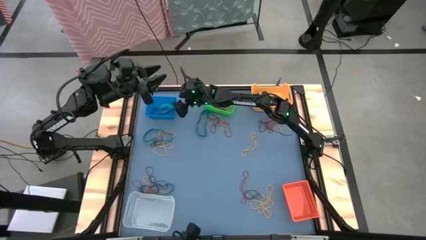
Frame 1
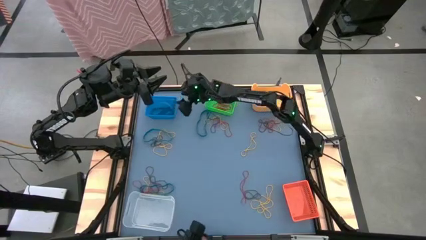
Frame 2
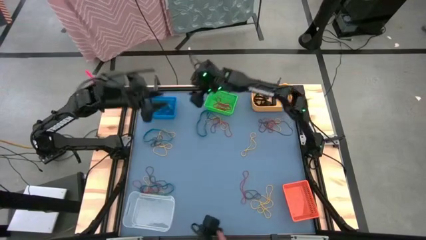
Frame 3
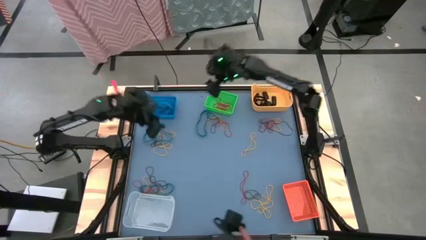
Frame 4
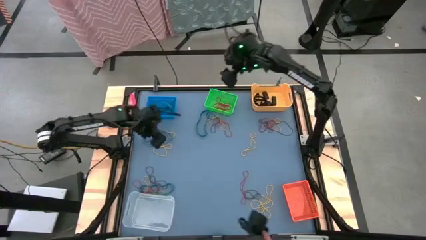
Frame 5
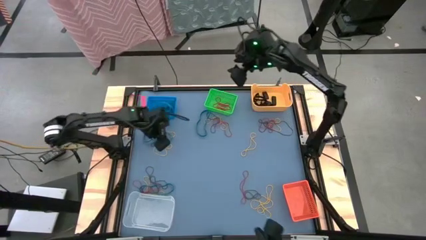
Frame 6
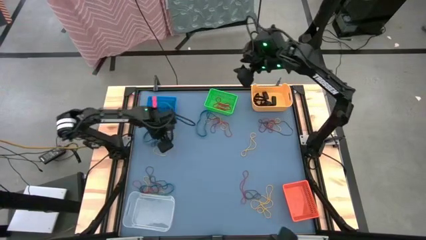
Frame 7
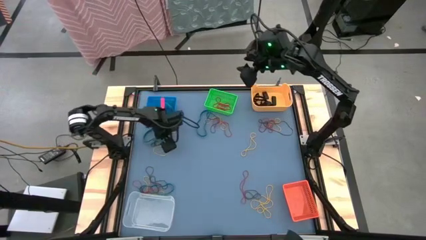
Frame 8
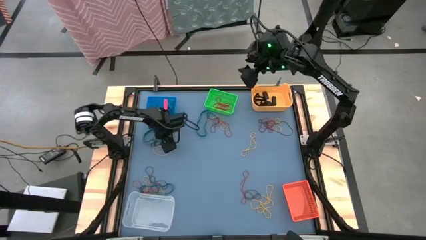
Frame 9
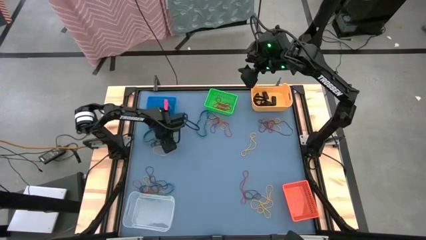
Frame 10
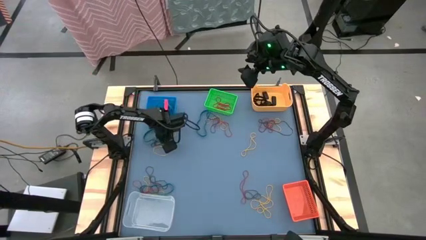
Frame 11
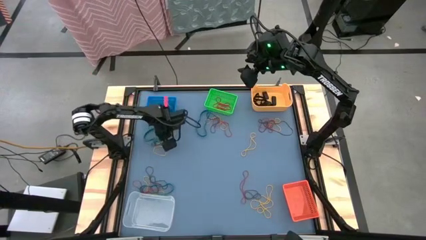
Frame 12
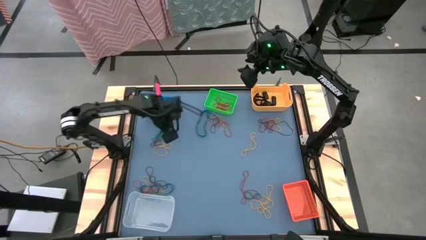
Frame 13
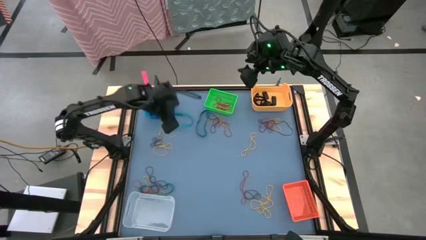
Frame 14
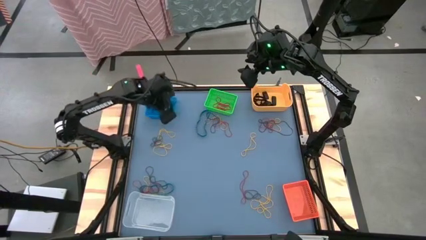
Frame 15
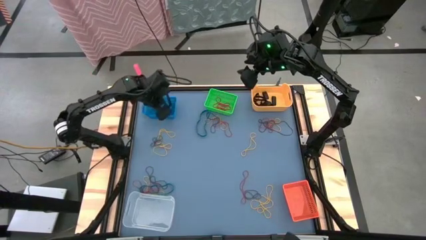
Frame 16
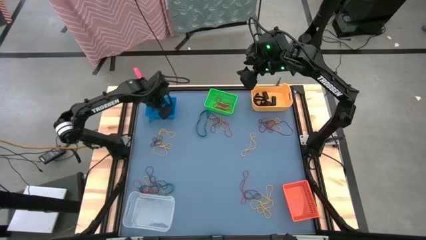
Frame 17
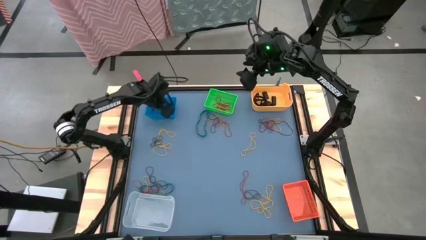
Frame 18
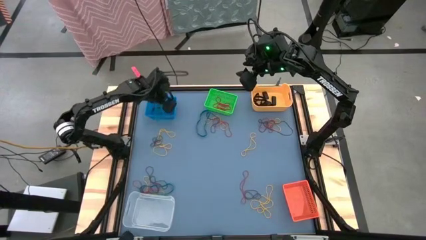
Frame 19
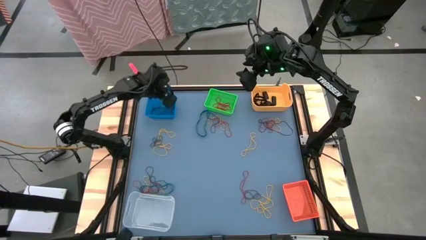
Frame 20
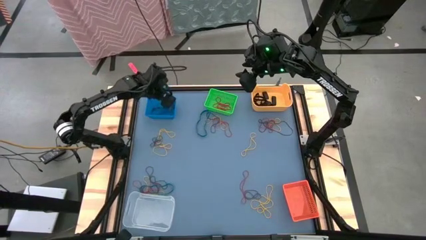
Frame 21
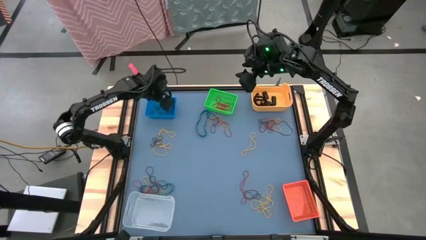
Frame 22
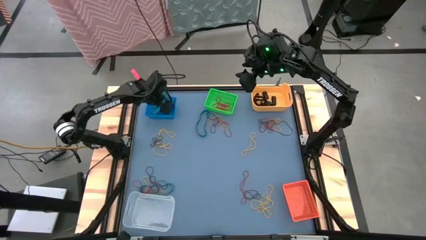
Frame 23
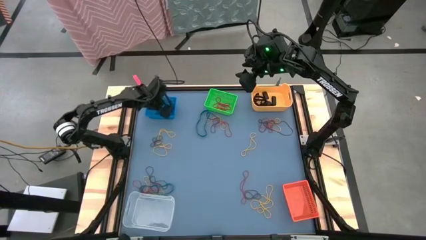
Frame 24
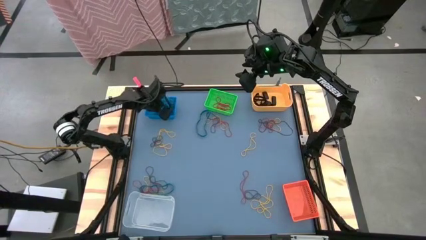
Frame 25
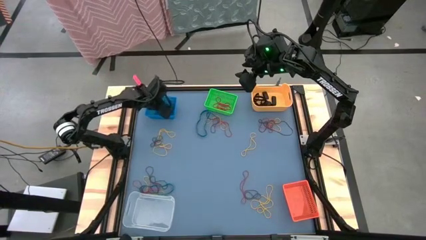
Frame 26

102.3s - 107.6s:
Task: Sort rubber bands into baskets
Put the blue rubber band into the blue bin

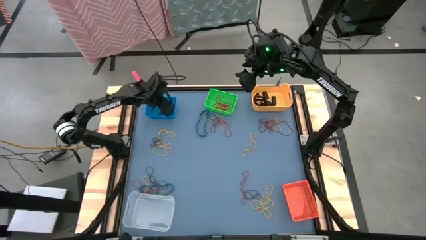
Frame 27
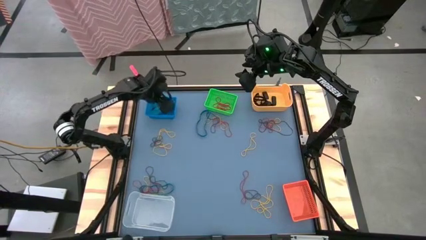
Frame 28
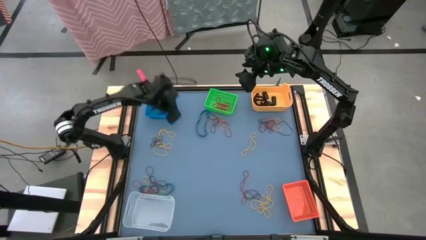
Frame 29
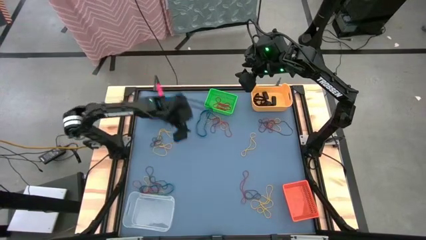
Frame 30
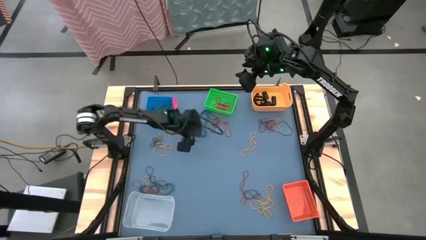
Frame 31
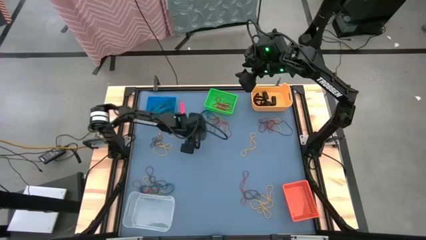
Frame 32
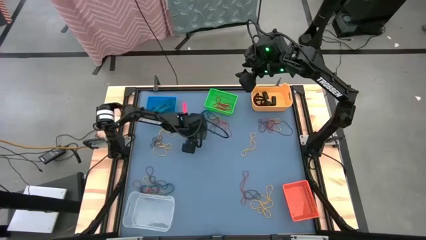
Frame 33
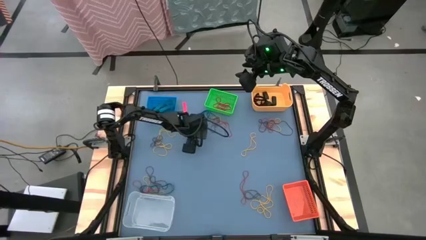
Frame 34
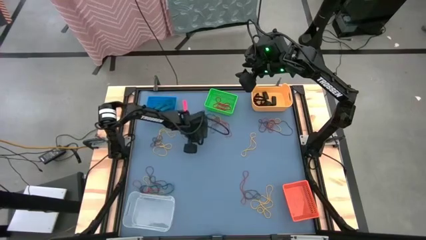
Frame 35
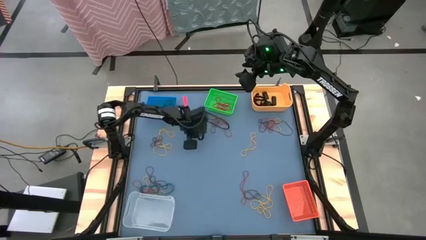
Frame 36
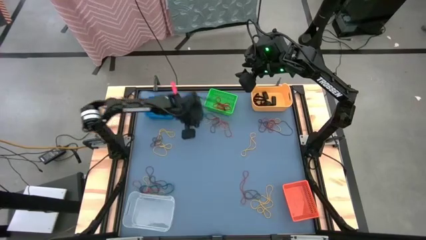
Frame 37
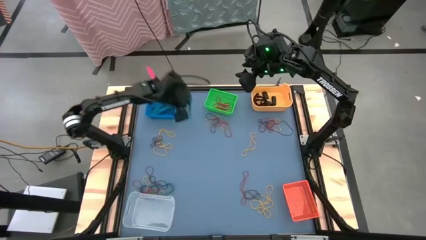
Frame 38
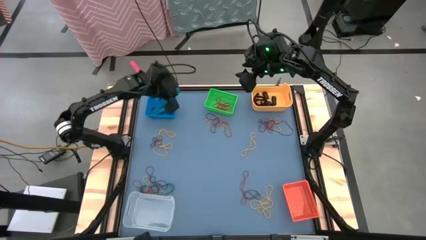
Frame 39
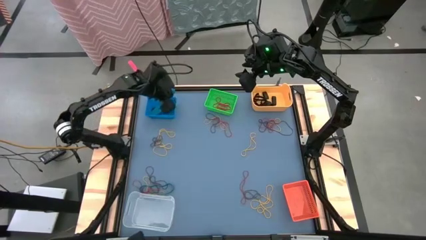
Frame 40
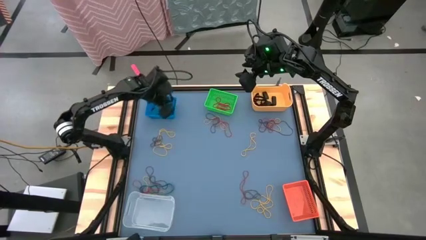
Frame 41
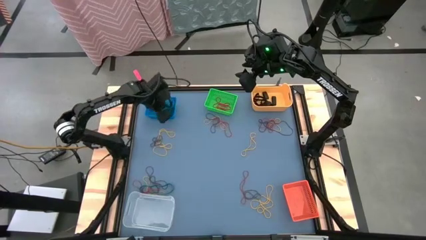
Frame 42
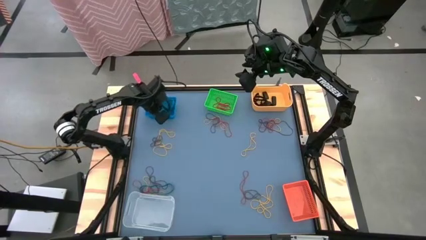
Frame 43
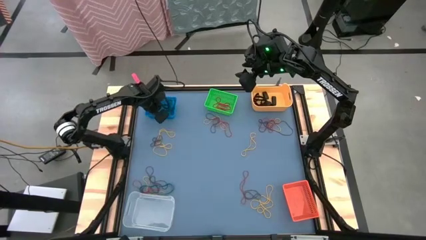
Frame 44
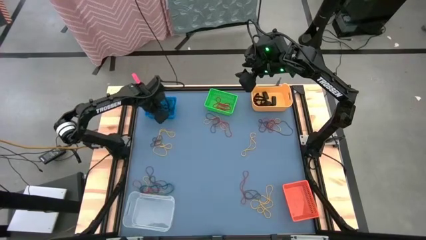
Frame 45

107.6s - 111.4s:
Put the blue rubber band into the blue bin

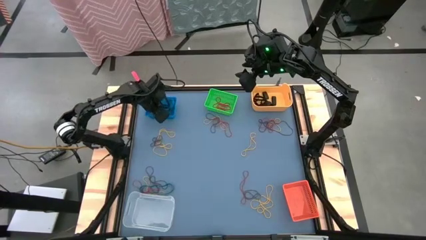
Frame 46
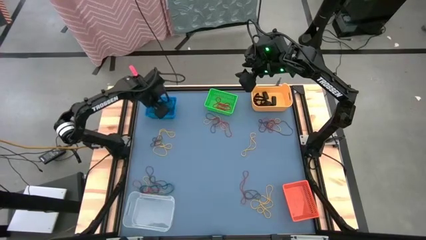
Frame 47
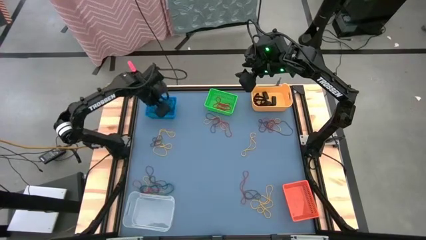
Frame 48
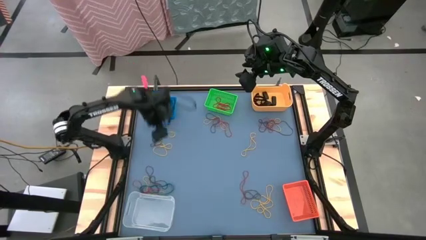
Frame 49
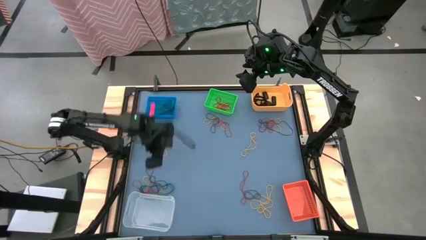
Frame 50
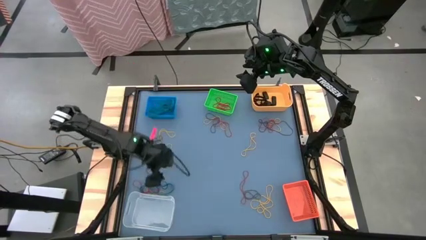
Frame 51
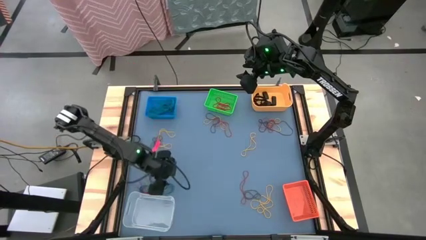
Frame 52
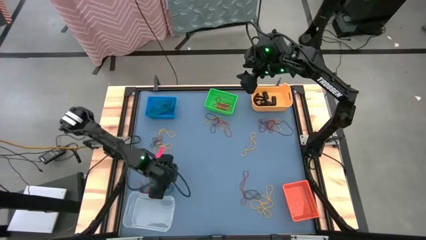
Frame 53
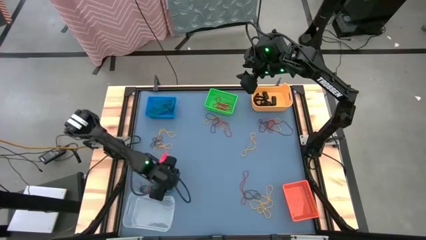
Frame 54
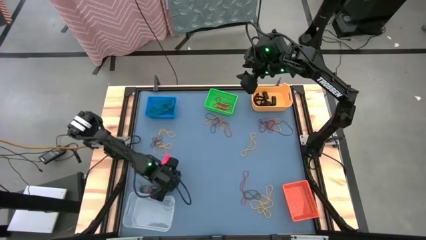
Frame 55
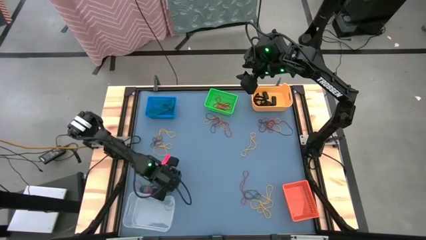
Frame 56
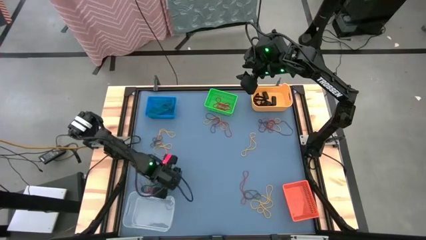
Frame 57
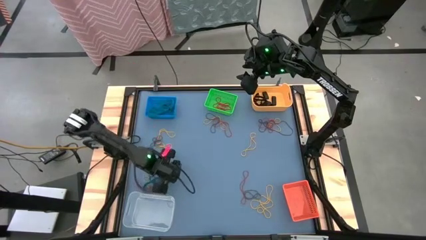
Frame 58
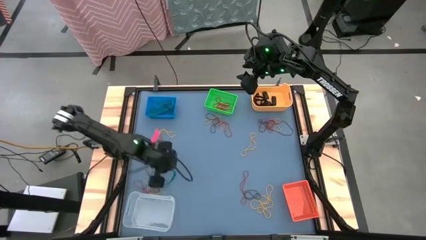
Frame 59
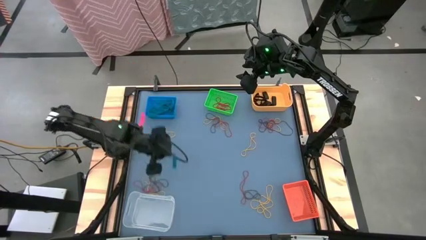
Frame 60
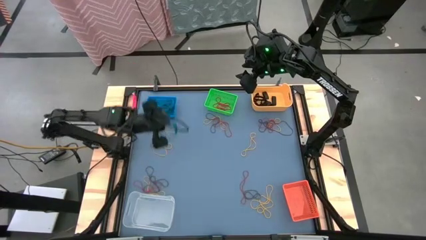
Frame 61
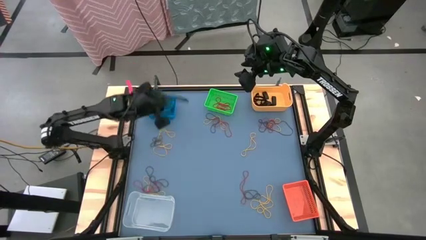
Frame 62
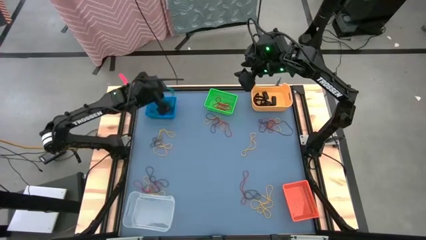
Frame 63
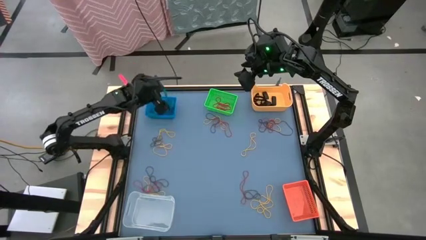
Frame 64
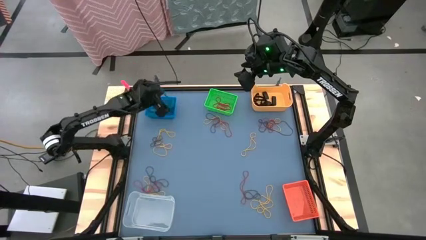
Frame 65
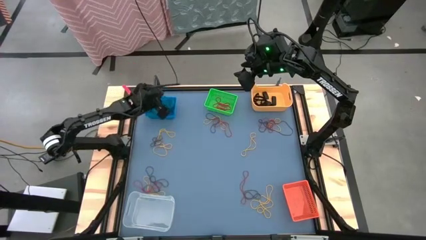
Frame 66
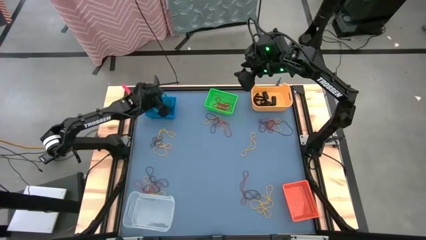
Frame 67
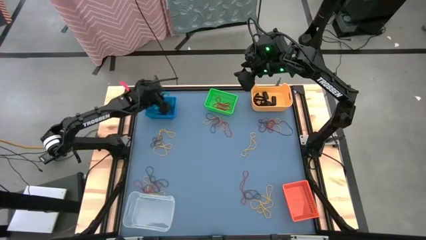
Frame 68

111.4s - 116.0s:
Put the blue rubber band into the blue bin

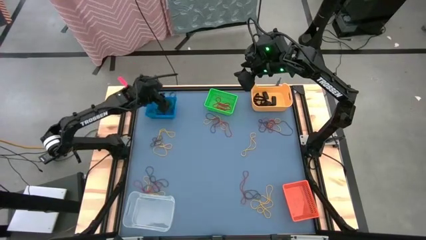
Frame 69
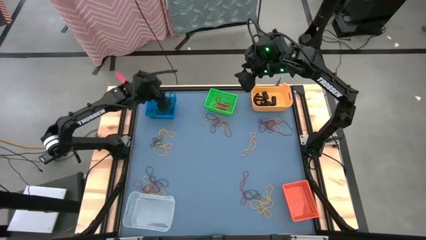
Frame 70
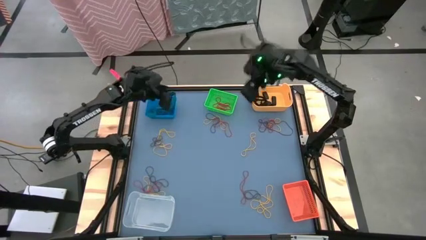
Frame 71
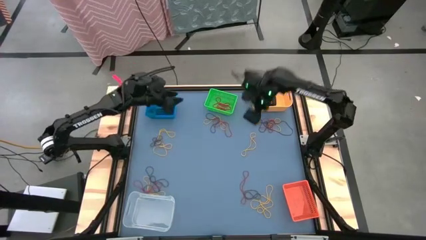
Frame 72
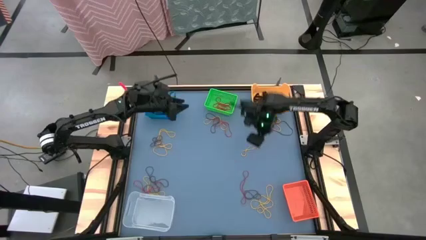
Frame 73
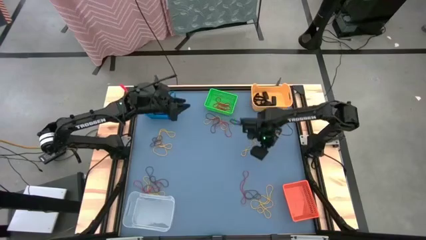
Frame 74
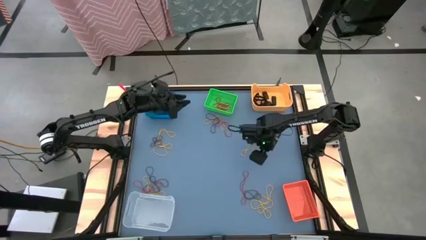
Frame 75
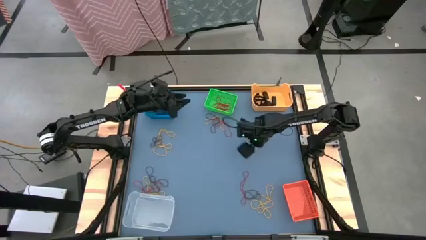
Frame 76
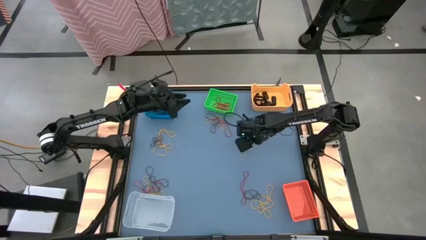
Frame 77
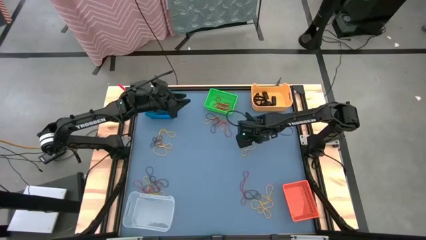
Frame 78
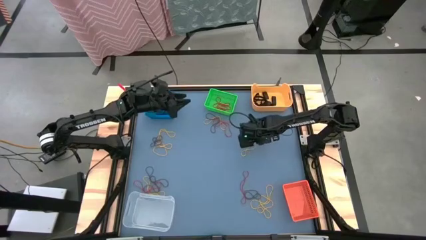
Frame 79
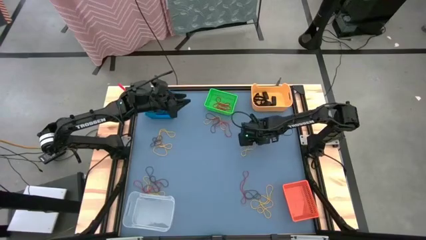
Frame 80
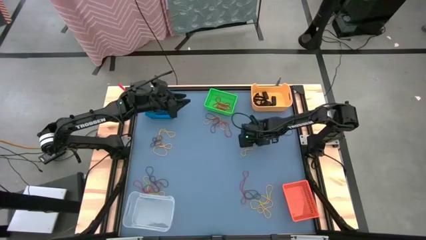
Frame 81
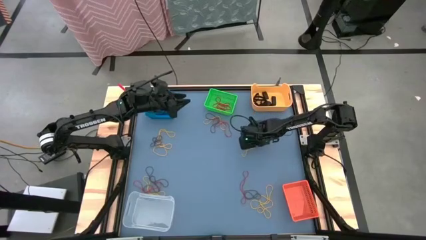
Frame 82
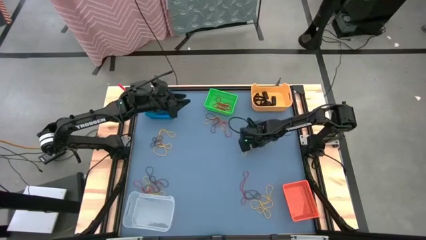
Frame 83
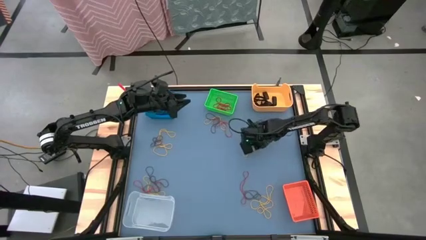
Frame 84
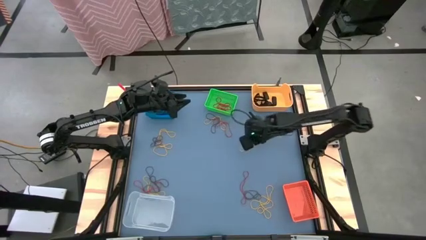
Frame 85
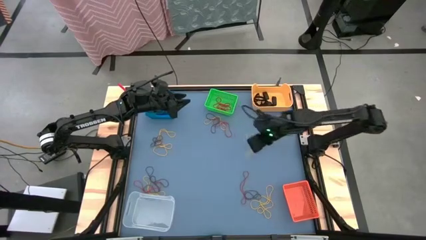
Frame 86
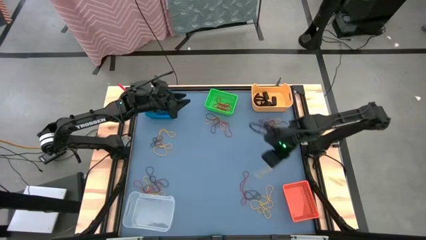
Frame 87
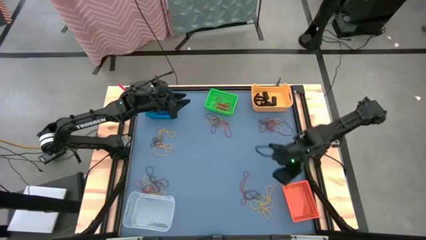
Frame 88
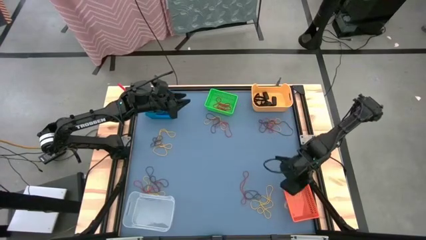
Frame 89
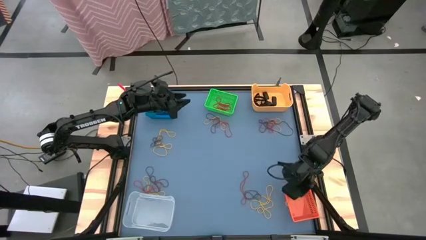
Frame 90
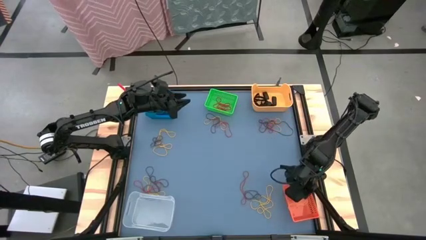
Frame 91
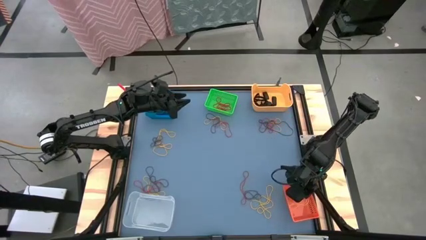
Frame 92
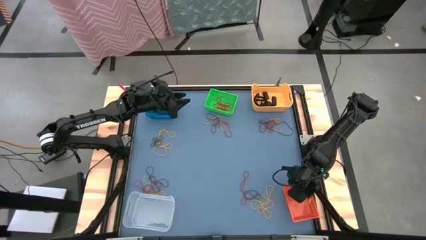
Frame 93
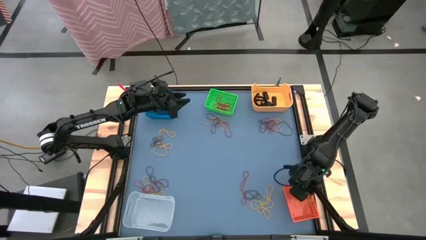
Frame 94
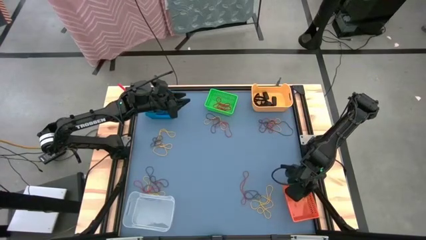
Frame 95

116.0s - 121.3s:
Put the yellow rubber band into the orange bin
